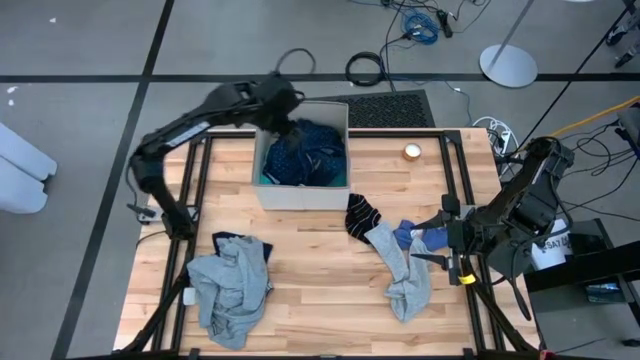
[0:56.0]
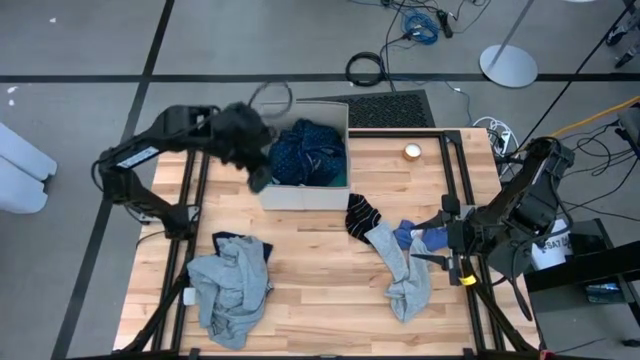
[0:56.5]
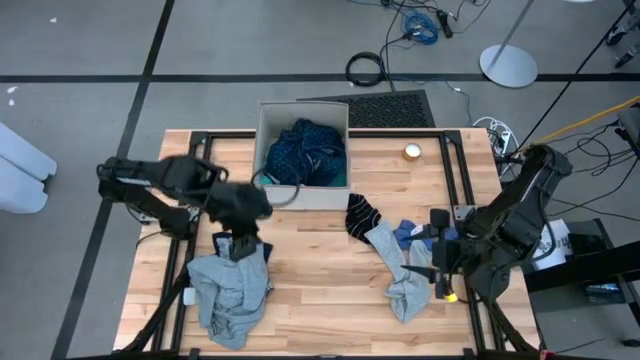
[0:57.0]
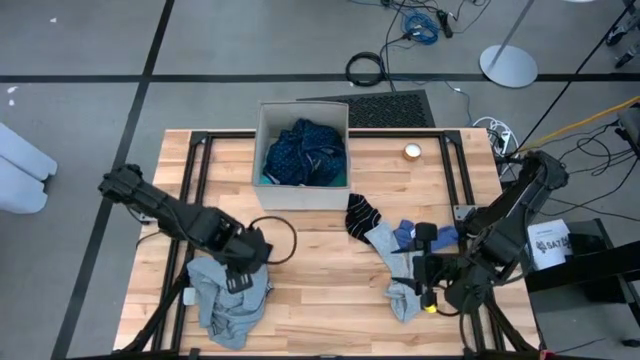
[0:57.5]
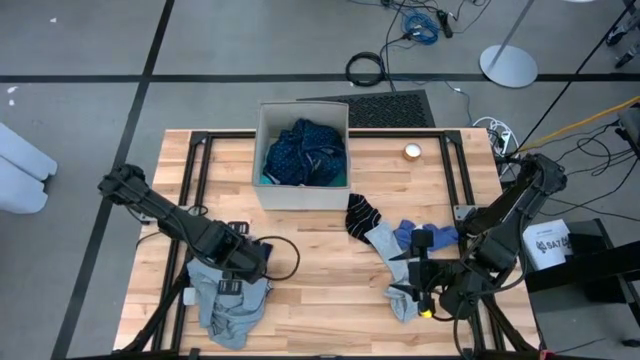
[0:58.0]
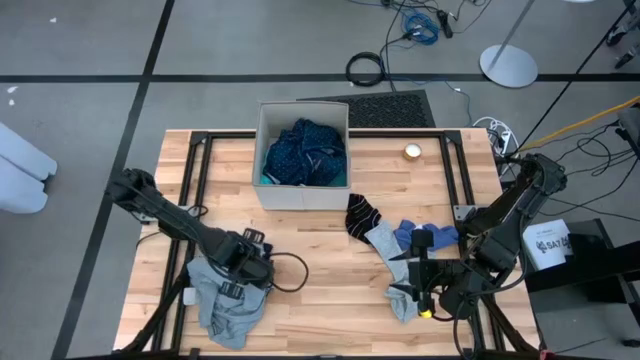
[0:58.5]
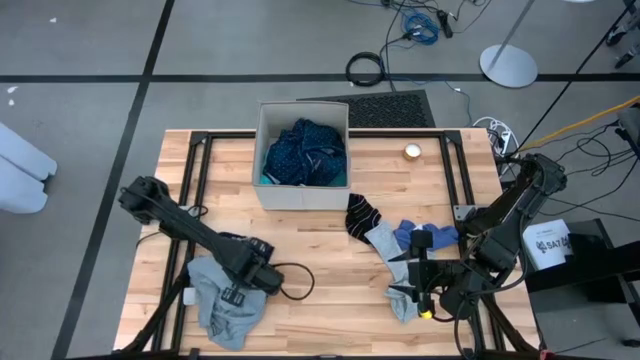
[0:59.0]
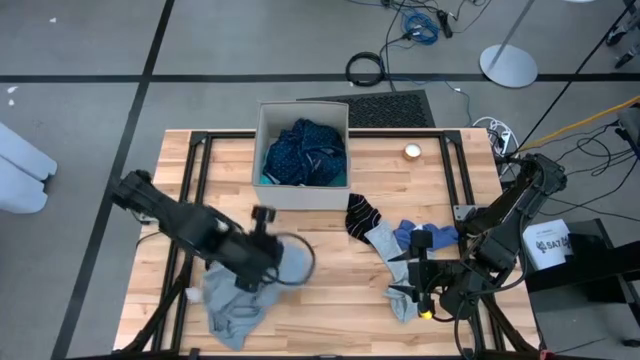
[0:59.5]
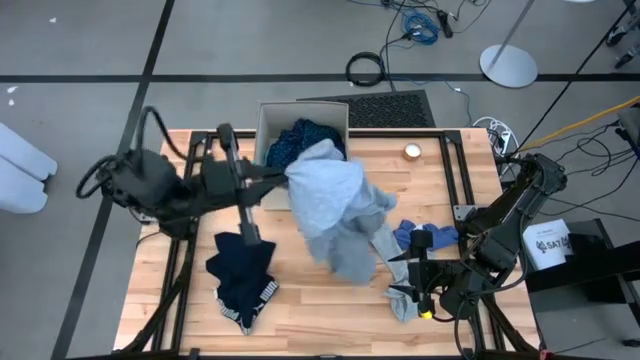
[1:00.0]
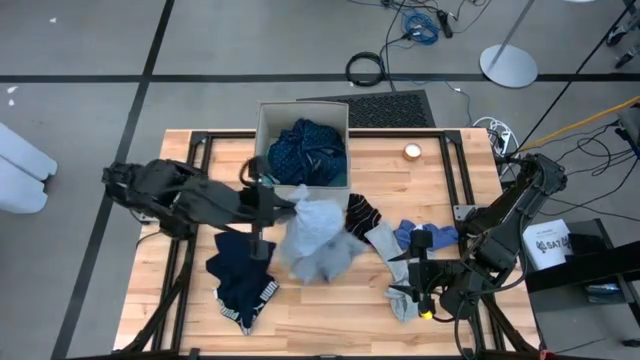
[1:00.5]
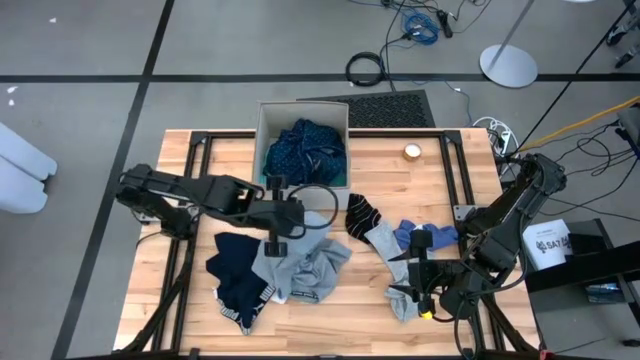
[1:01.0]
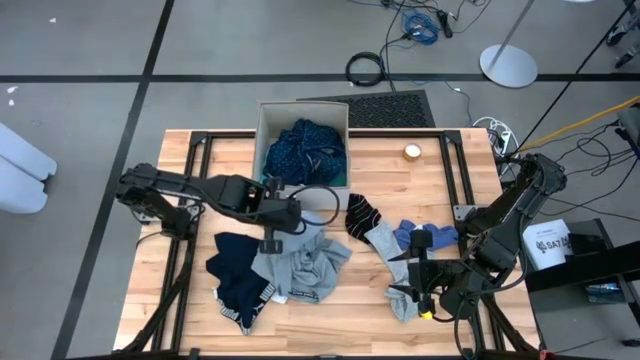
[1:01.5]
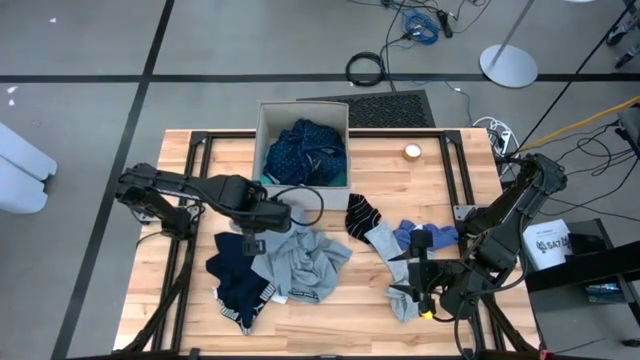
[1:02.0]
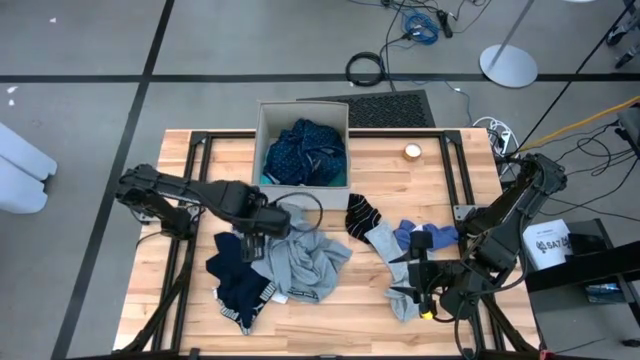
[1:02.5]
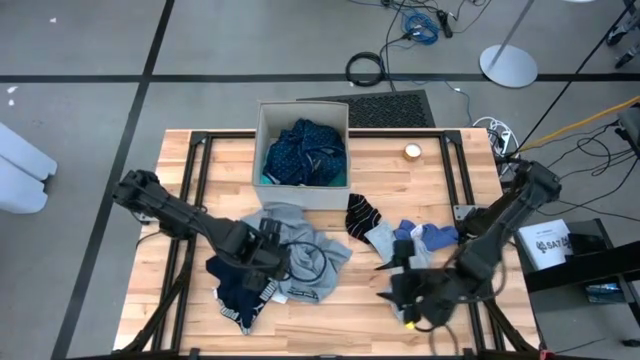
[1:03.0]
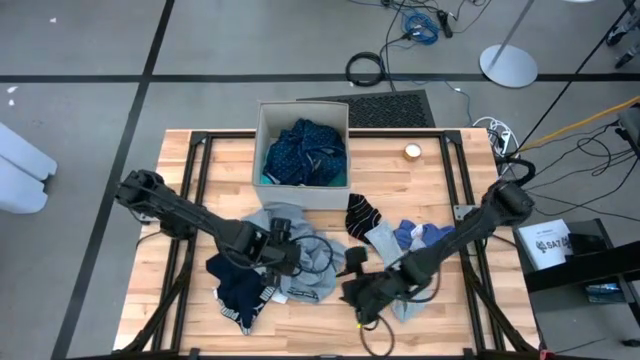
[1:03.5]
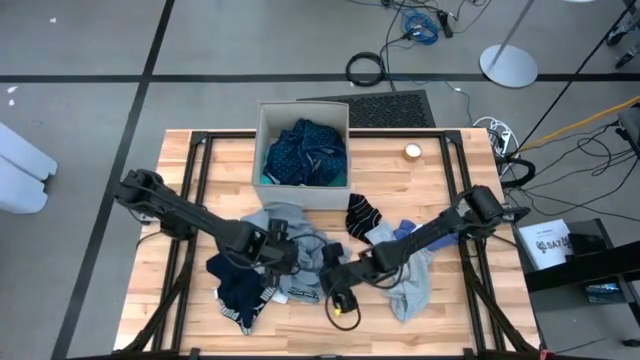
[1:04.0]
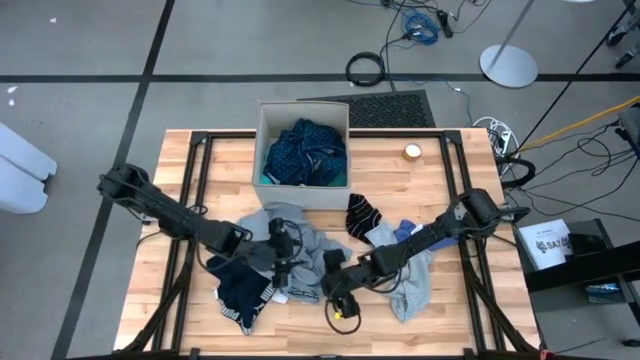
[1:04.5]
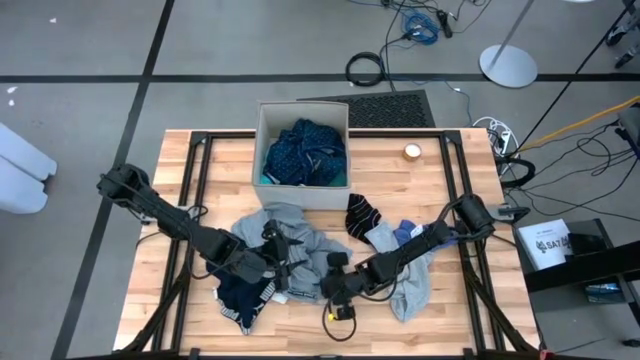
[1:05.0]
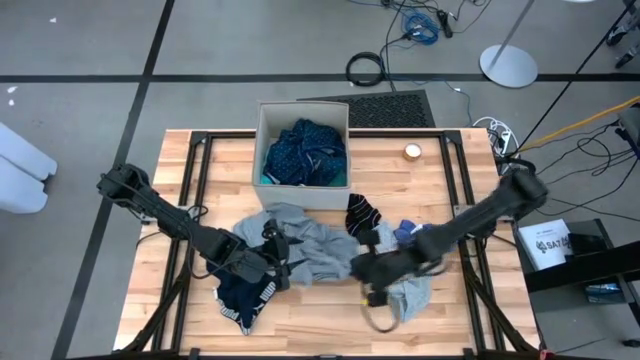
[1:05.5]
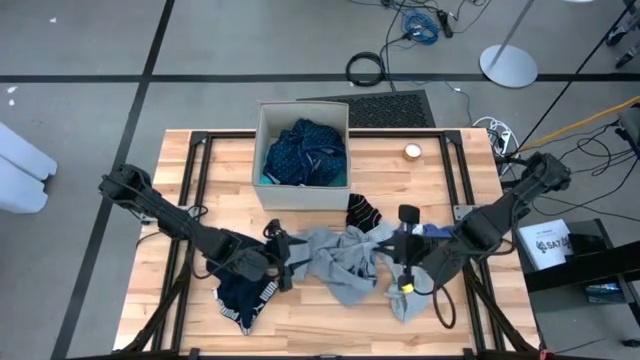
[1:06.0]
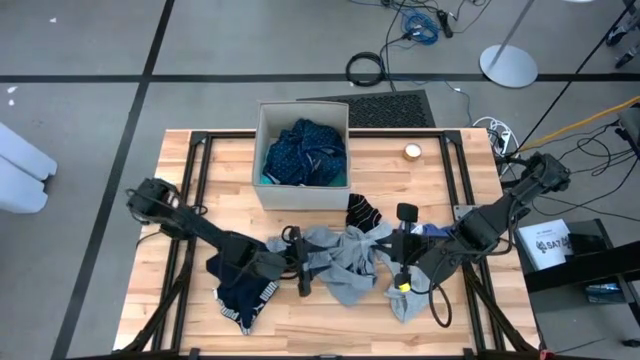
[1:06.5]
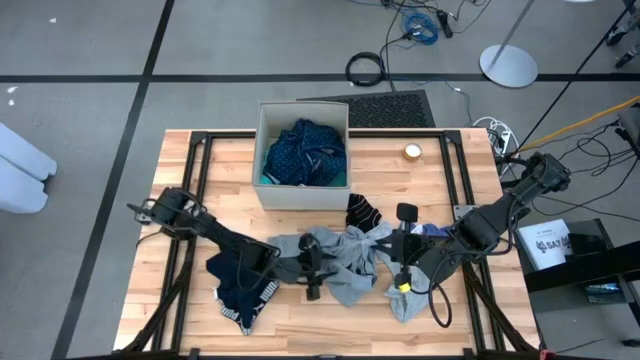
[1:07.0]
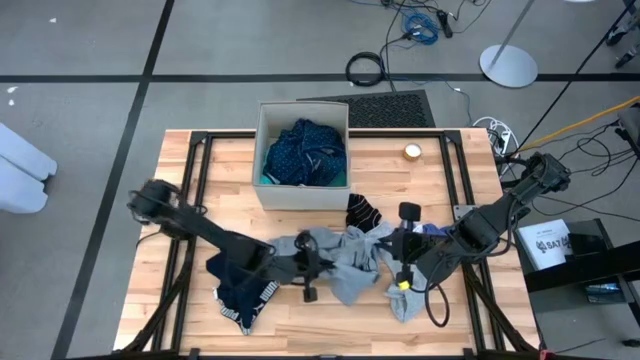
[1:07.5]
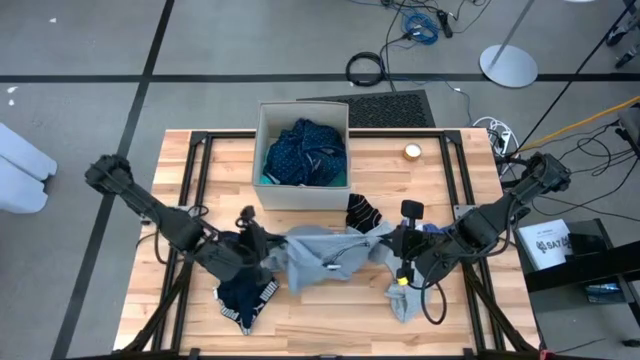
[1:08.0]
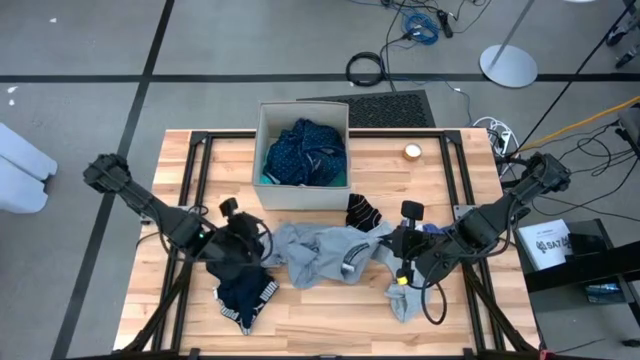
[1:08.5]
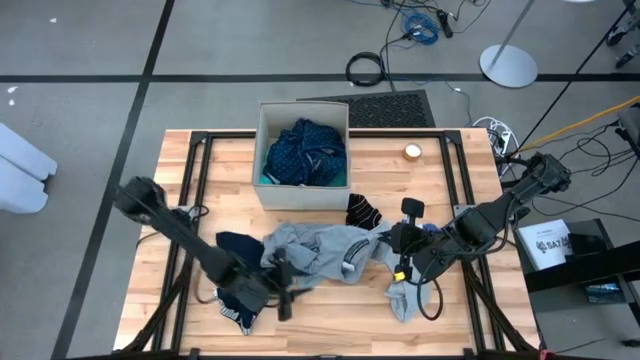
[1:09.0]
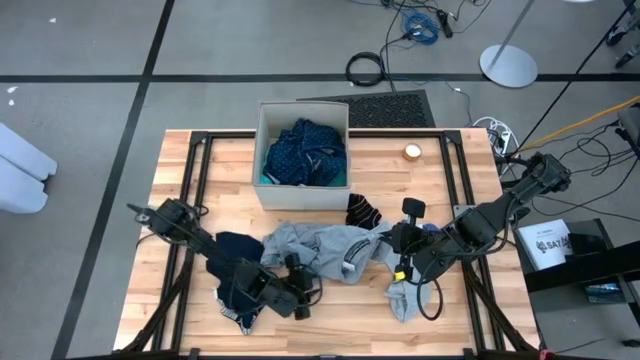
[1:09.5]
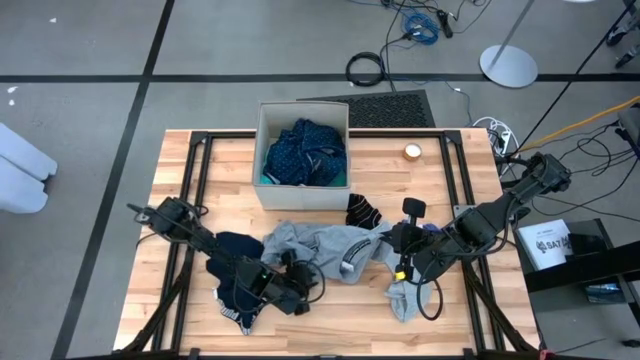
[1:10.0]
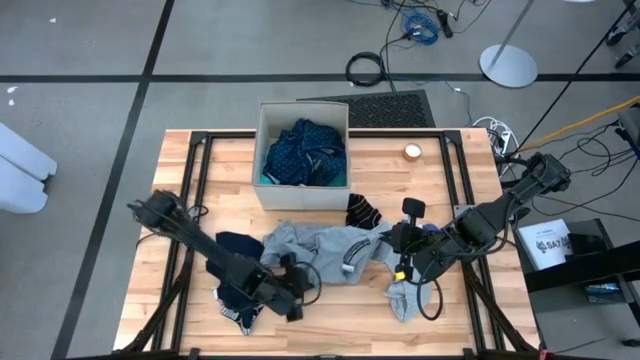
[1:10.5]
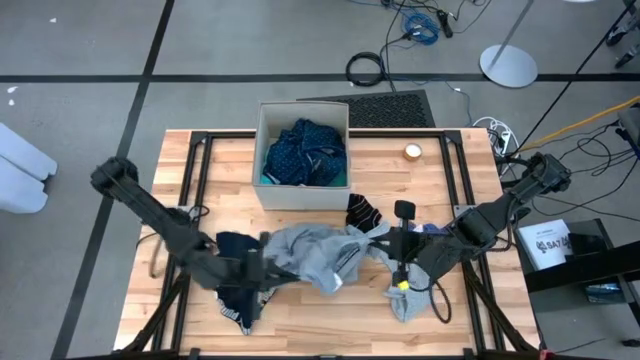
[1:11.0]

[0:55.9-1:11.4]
Task: Sort clothes
Put the gray shirt into the white laundry organizer

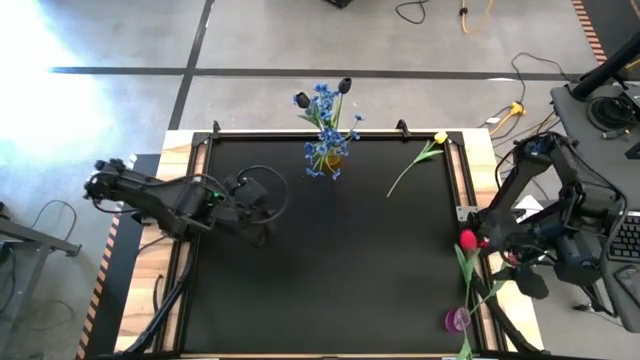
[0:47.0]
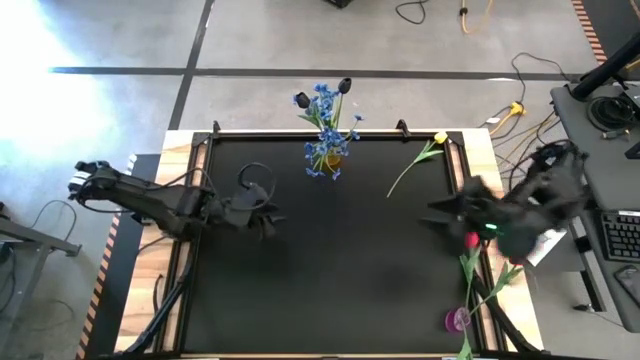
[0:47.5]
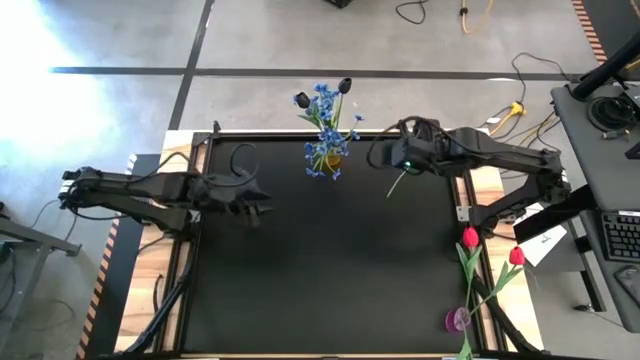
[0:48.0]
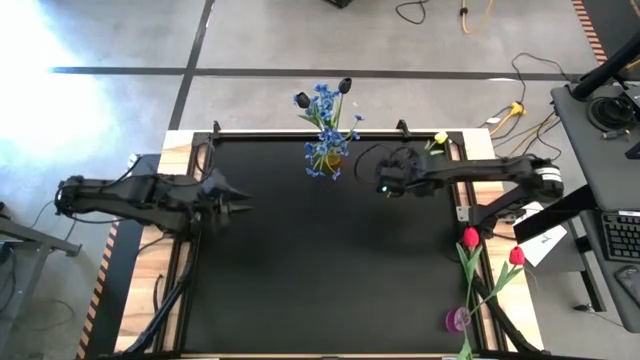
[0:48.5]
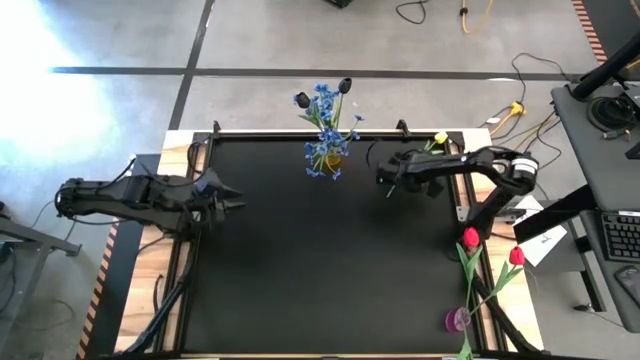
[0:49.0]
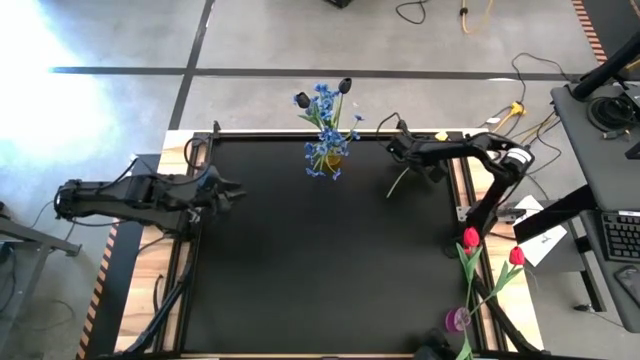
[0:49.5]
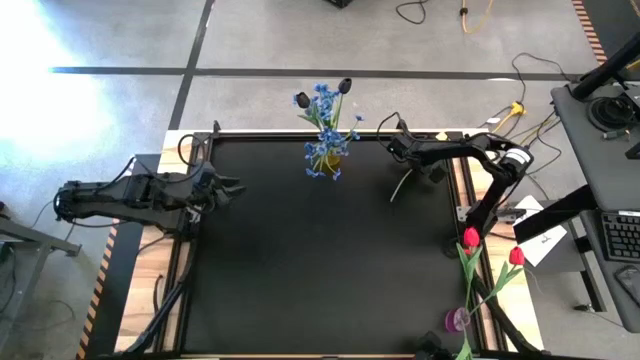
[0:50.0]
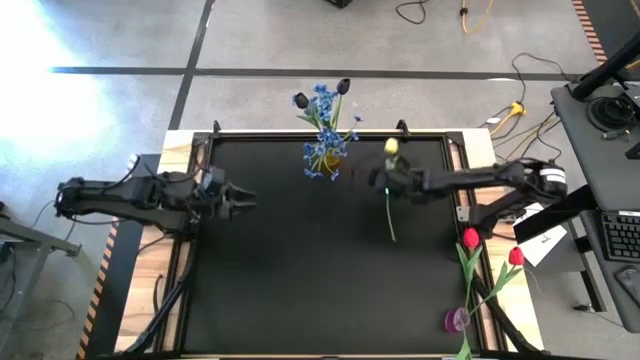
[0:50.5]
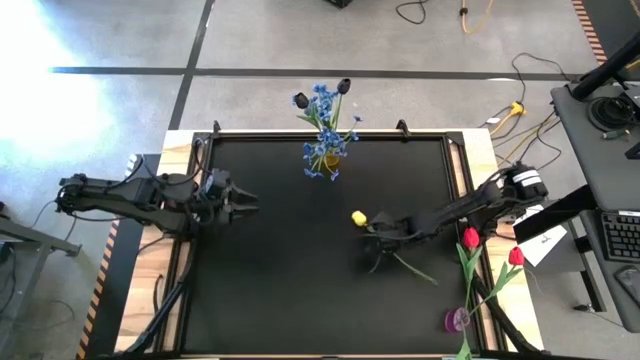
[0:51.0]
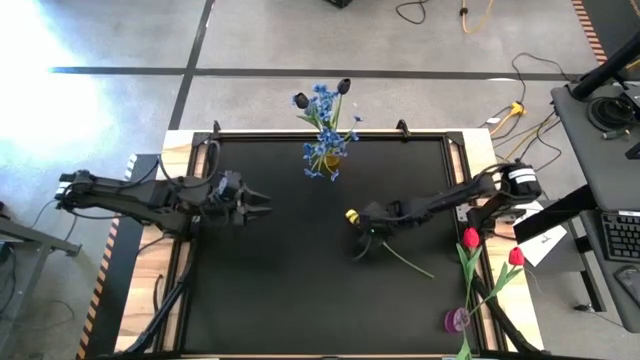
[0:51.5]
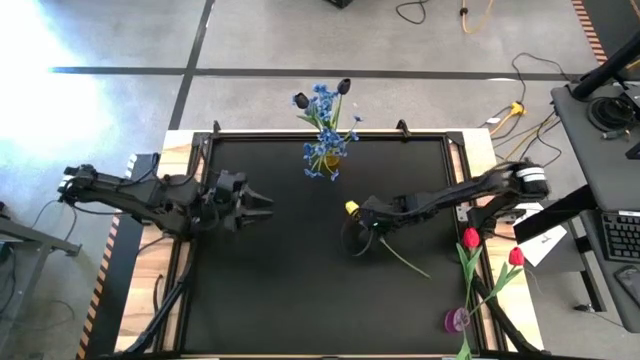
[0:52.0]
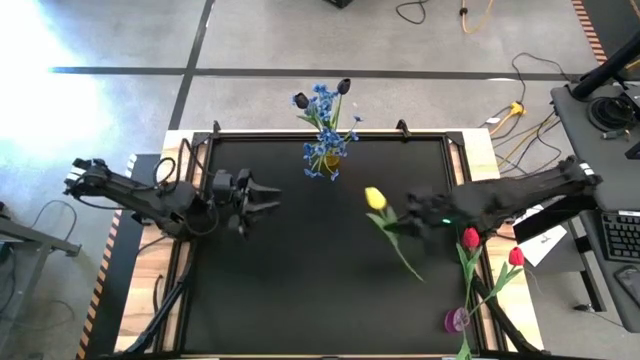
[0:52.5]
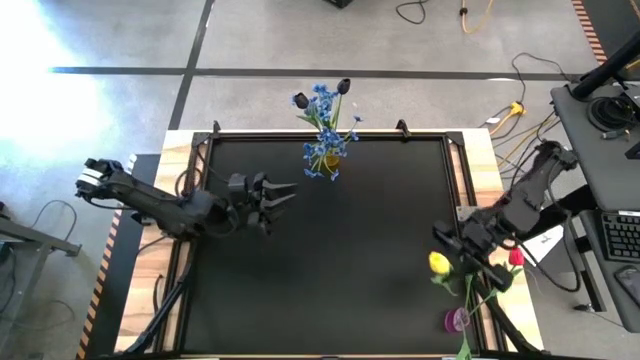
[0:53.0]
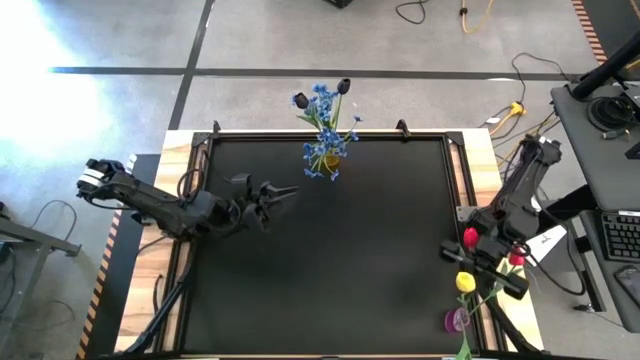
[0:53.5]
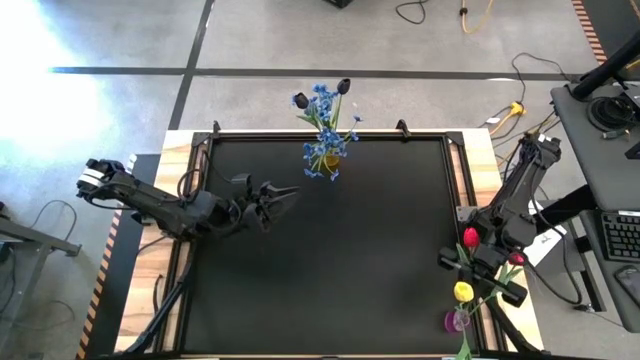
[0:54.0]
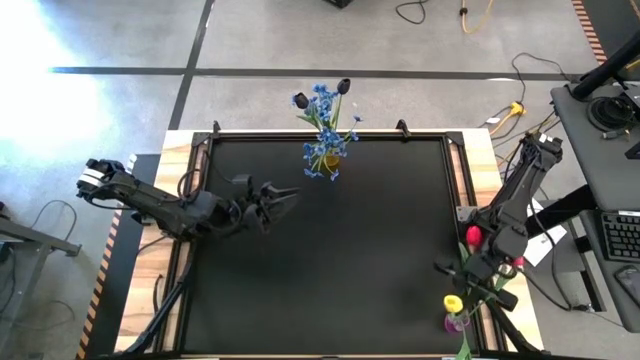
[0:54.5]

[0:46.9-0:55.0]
Task: Sort flowers into vase by color
Put the yellow flower into the purple vase
